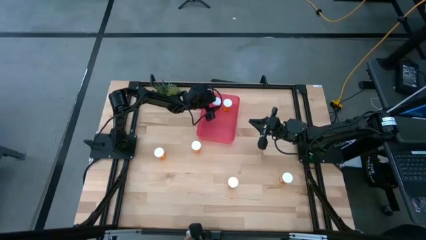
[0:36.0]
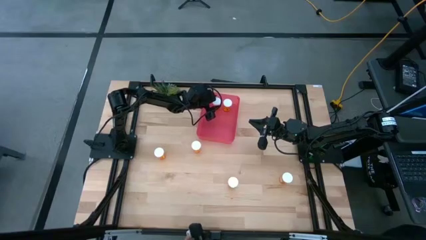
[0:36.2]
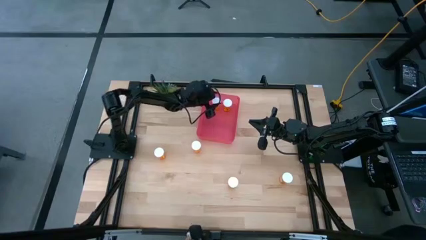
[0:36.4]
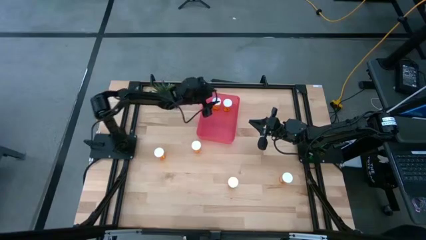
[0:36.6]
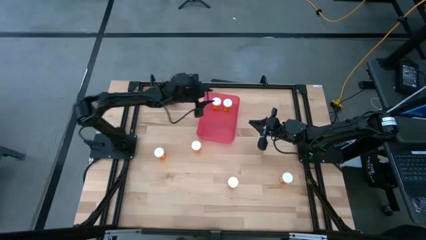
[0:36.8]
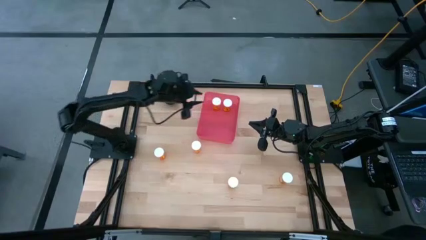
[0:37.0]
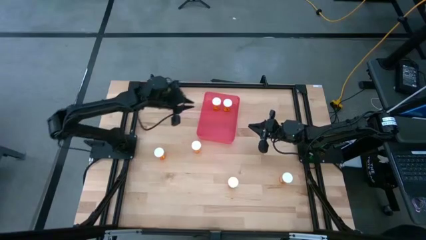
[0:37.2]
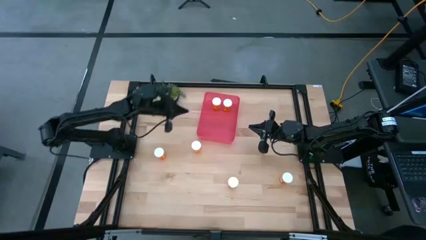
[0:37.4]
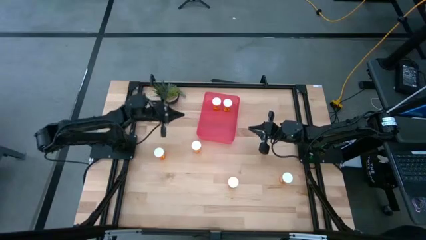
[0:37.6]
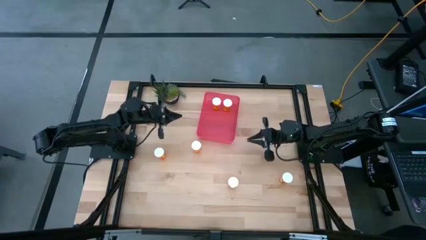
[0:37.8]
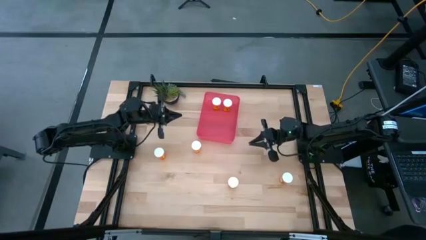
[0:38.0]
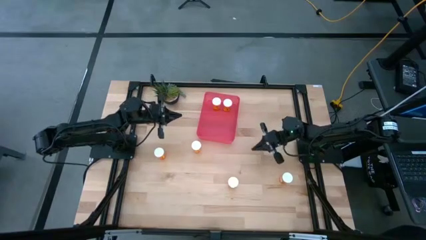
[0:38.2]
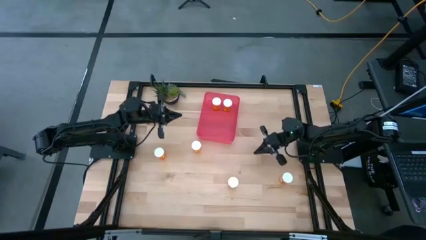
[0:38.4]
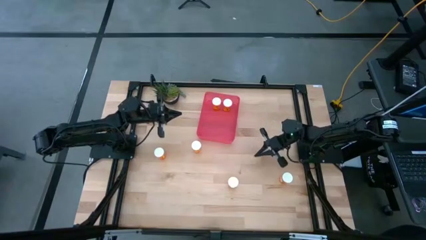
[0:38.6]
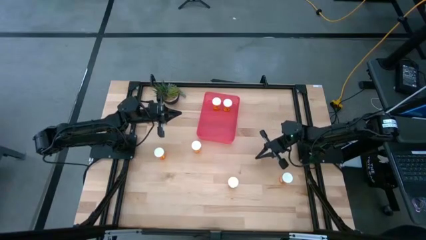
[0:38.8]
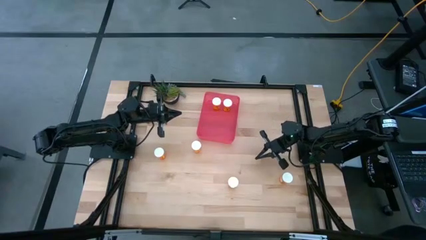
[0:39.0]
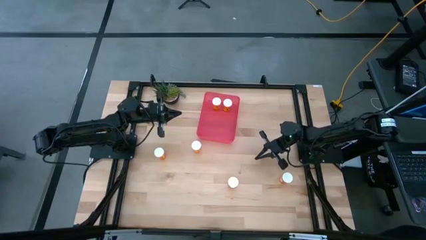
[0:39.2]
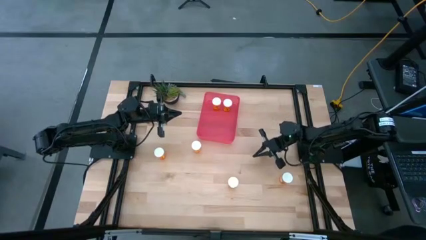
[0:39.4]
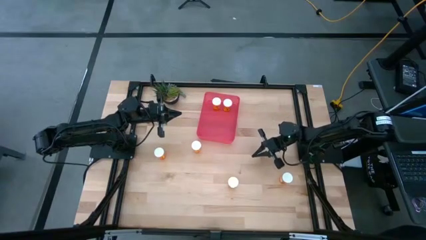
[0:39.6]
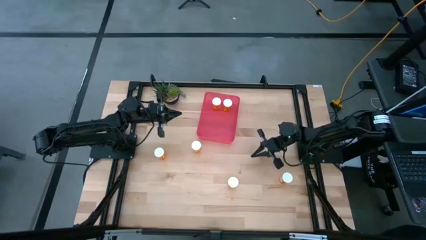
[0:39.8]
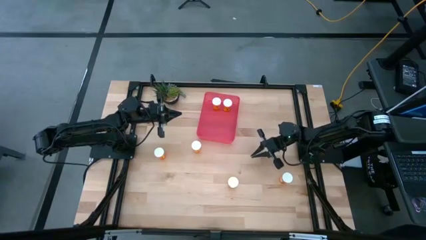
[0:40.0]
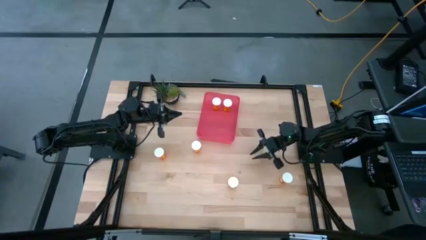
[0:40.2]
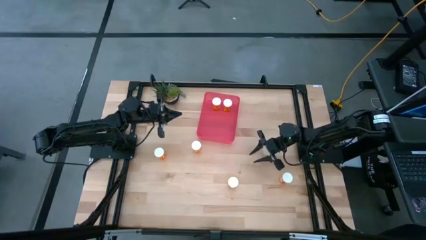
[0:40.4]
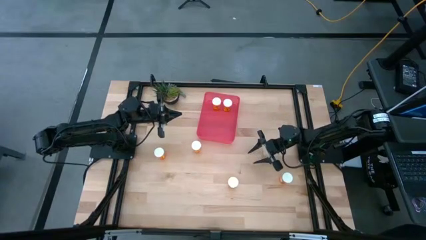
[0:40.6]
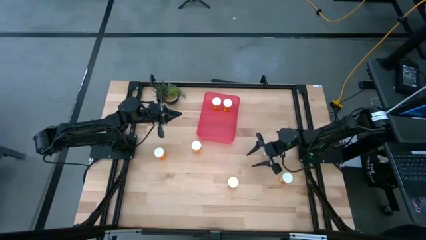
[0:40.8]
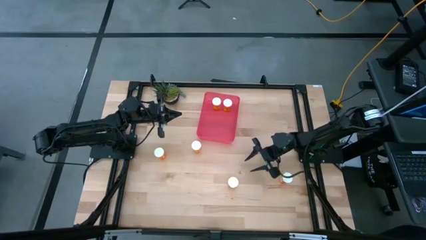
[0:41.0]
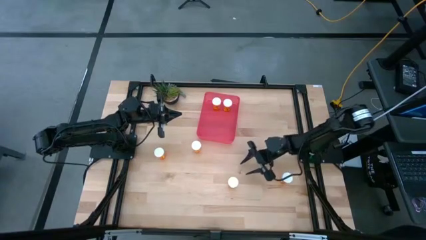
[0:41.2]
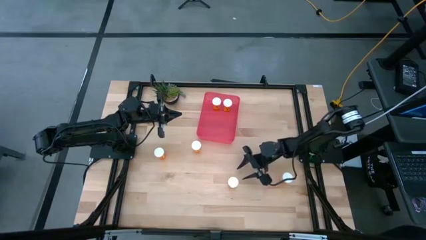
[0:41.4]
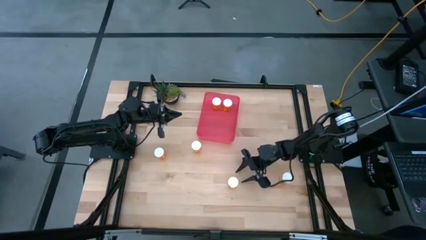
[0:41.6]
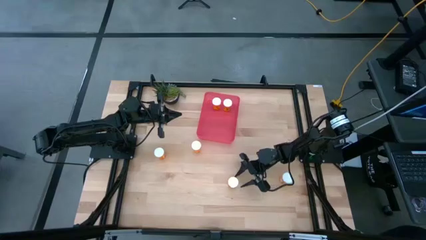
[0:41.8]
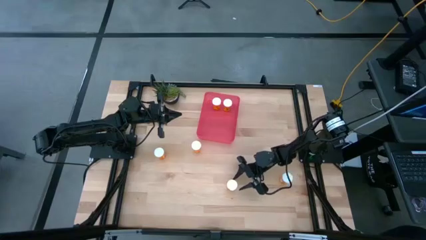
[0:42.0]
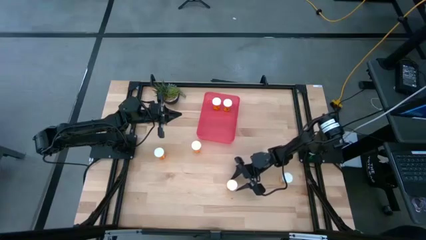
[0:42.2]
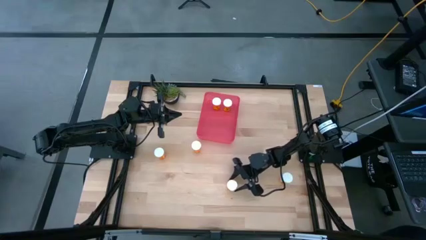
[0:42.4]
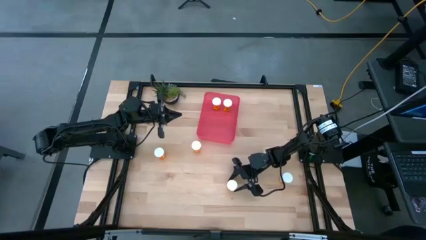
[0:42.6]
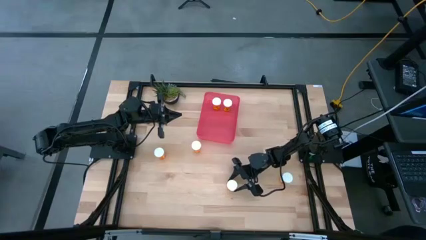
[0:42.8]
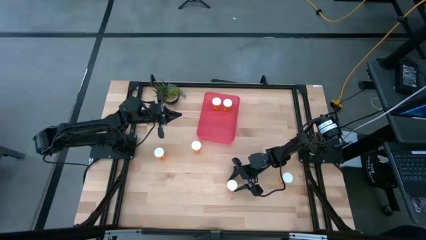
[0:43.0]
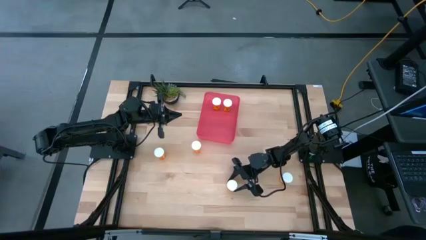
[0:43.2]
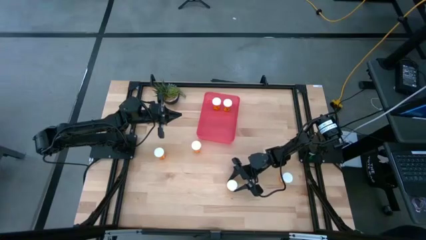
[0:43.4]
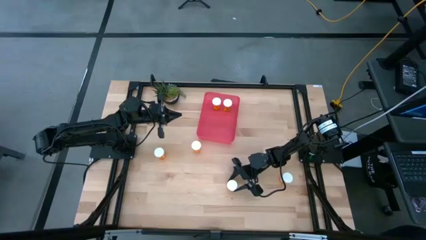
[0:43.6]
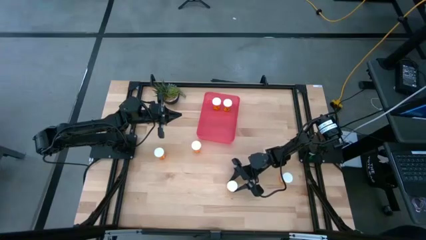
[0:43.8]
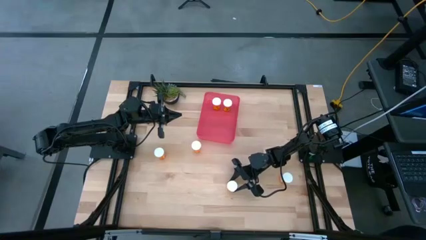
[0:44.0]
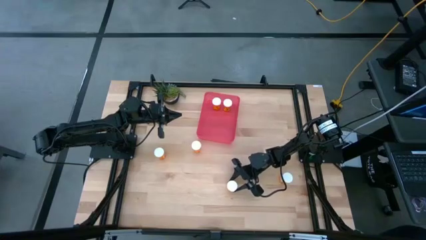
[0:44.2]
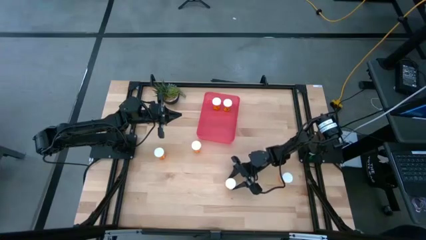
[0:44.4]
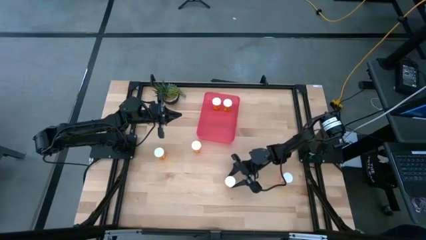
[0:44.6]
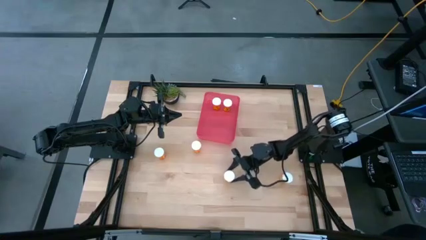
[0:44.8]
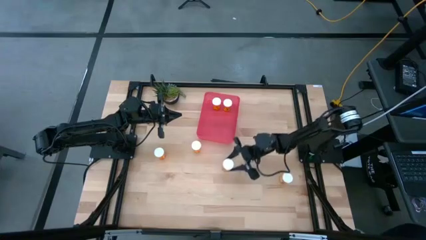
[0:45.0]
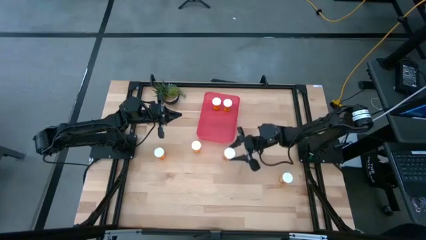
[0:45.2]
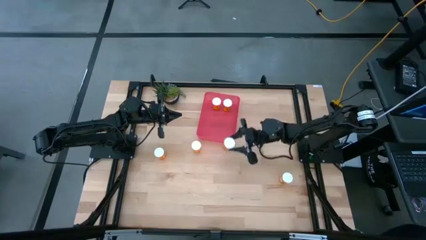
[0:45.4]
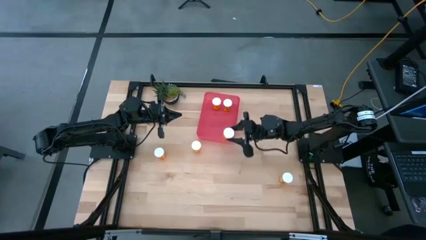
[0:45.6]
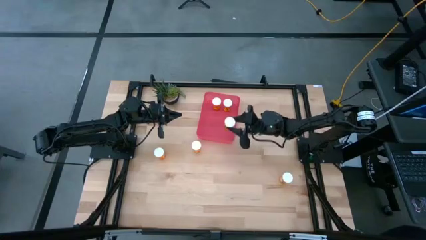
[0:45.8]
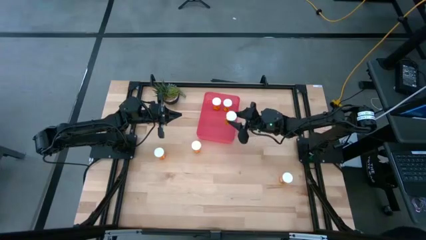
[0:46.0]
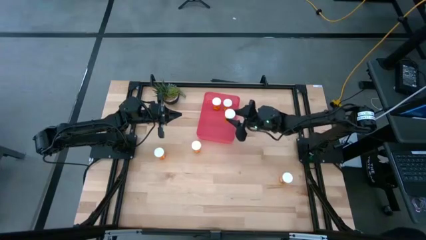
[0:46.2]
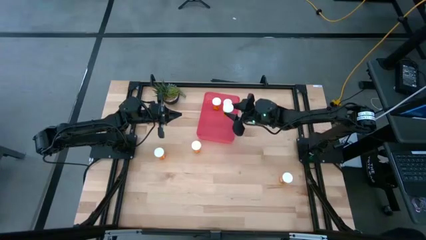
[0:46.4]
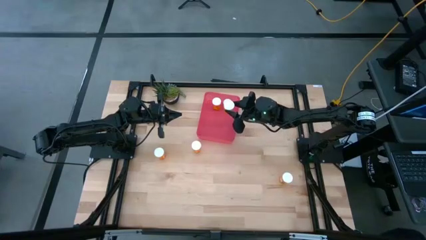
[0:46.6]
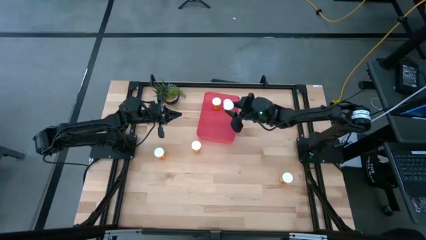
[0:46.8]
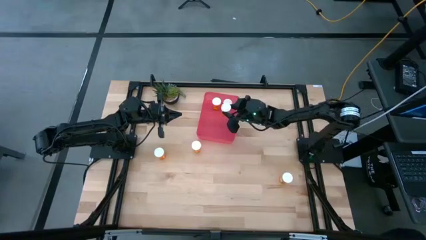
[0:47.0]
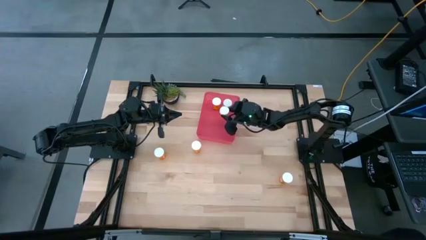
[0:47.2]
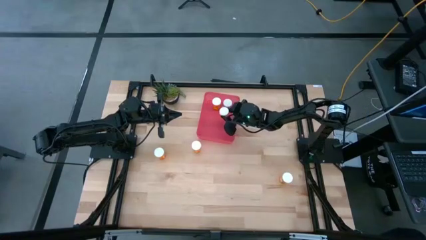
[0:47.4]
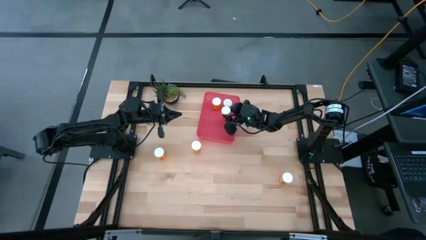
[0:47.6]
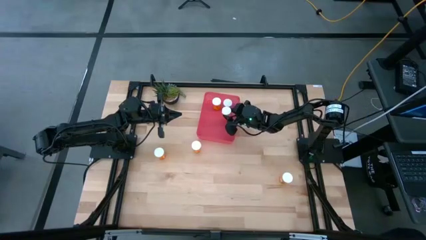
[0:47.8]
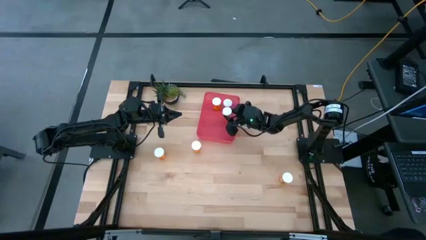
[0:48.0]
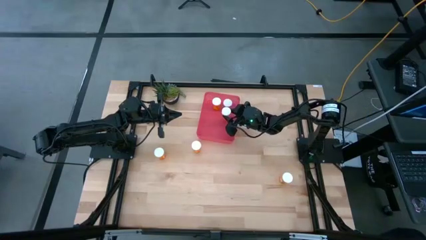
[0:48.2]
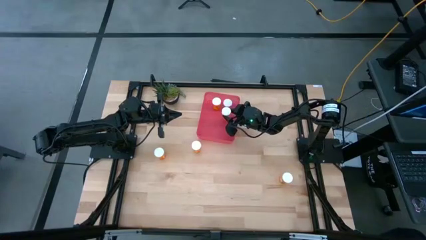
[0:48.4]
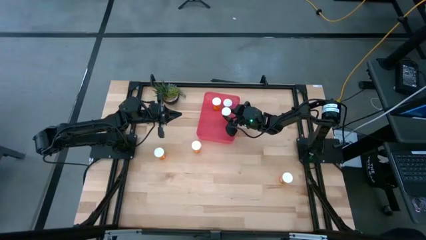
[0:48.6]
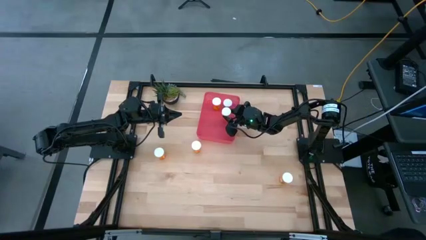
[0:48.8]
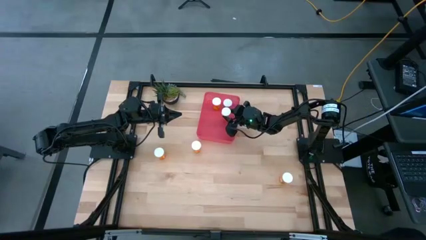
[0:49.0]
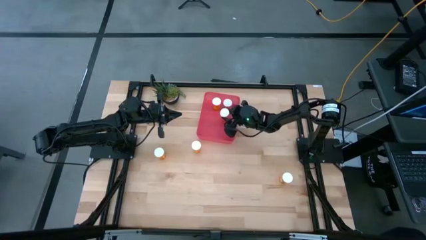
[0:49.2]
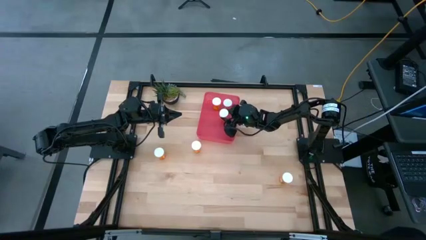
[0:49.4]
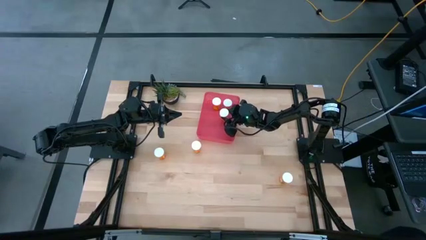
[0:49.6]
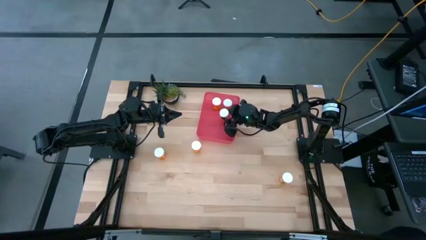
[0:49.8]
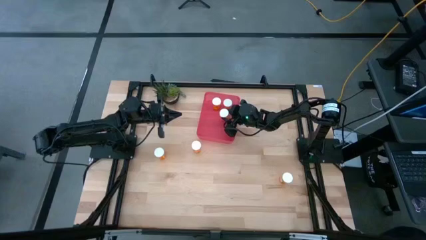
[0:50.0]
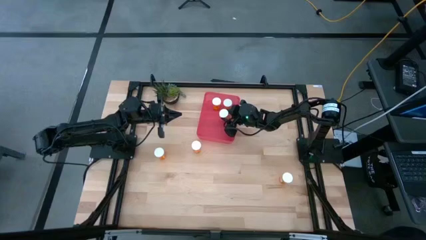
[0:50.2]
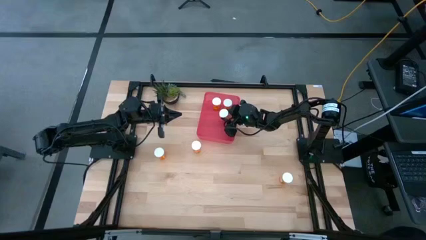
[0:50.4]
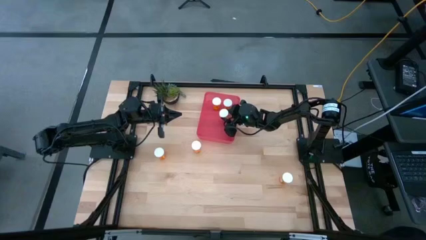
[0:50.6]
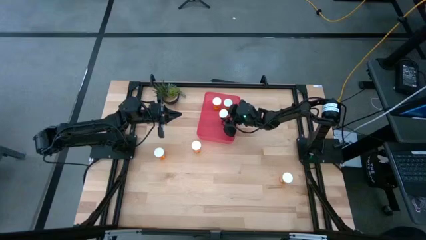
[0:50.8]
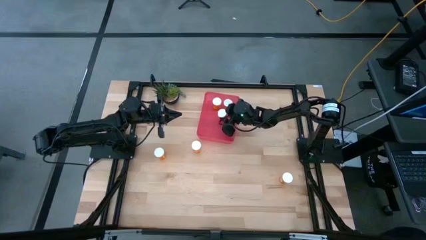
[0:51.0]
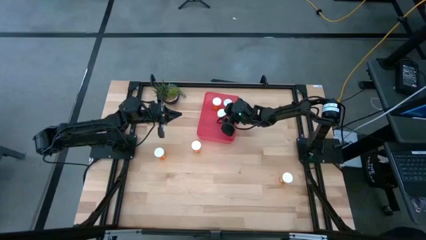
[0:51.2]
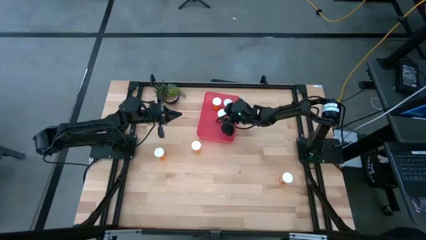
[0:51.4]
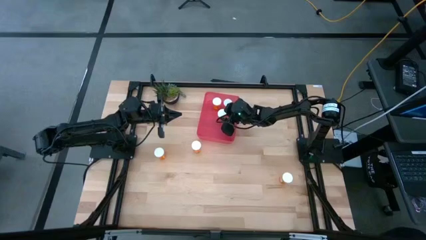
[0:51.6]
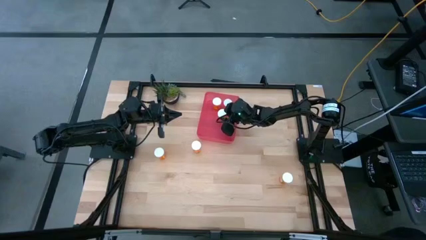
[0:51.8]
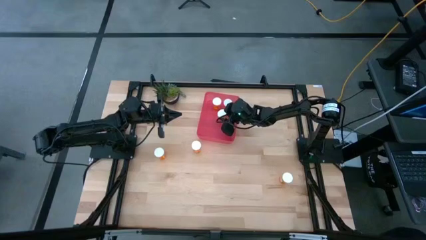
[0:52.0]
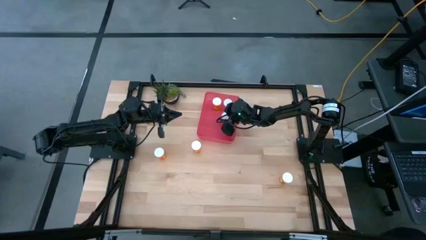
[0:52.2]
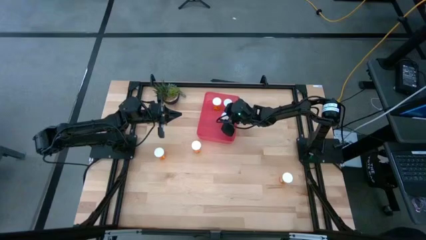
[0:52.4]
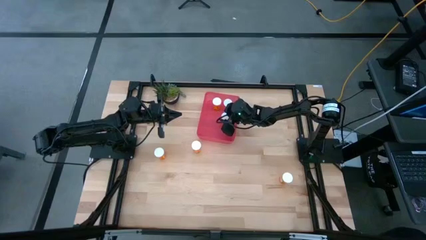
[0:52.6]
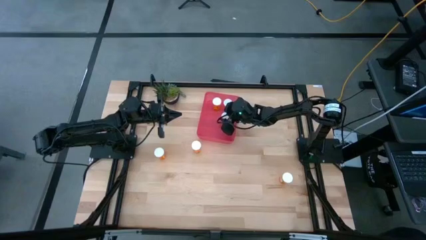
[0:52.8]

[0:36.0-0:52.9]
Task: Pick and place pill bottles into a basket
Put the orange pill bottle into the red bin
